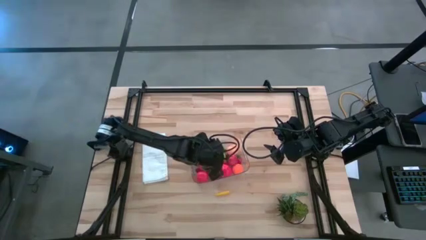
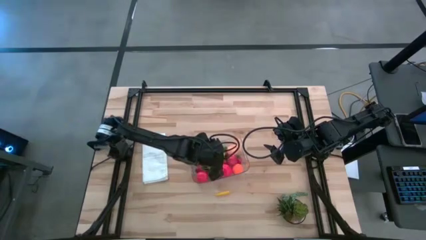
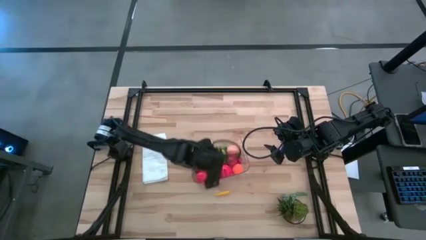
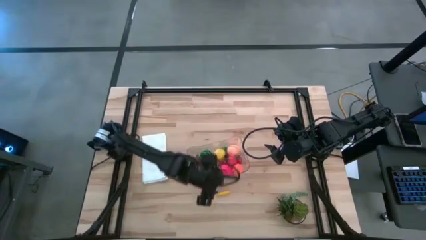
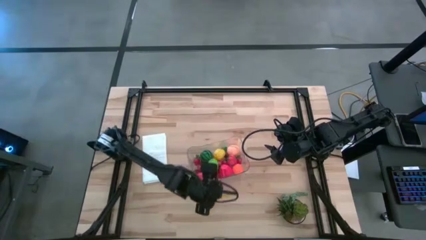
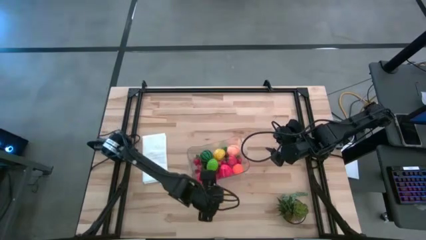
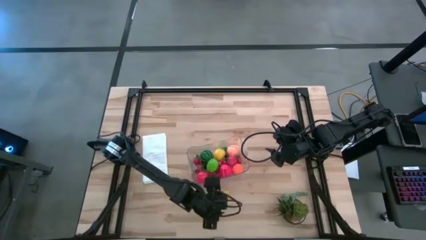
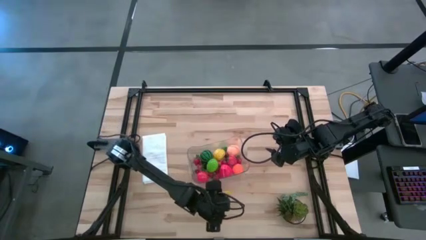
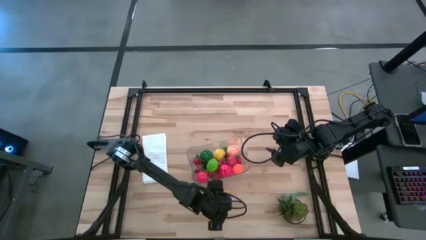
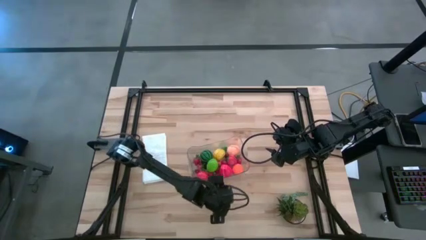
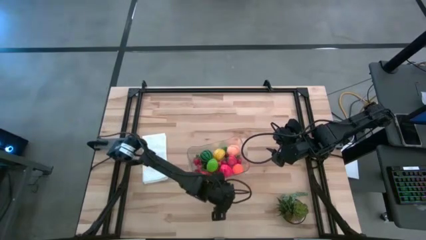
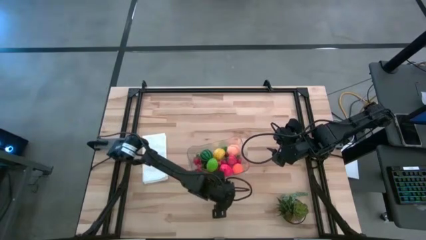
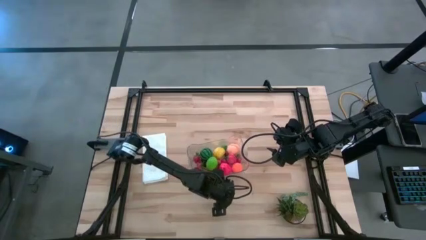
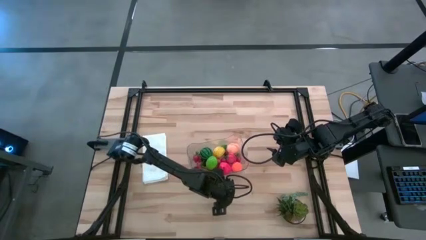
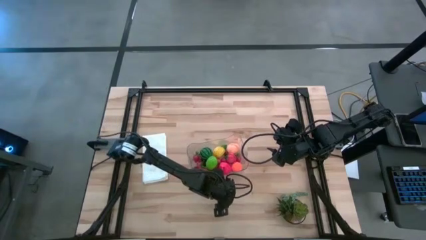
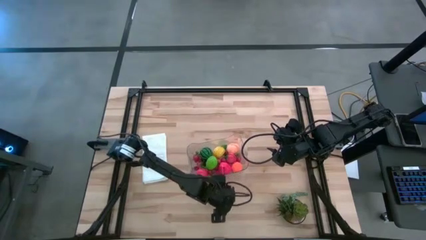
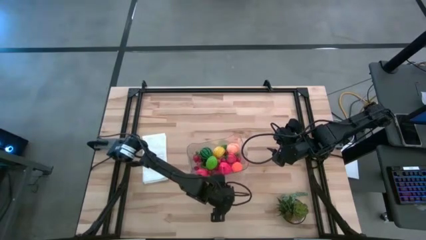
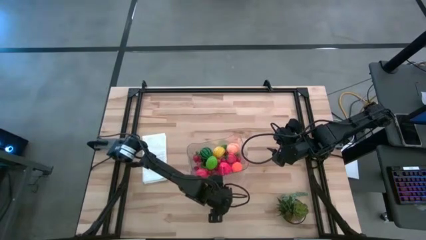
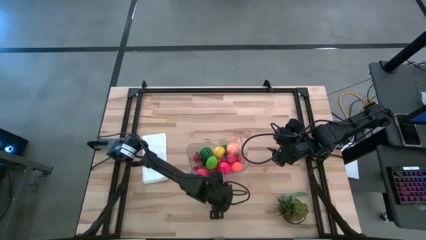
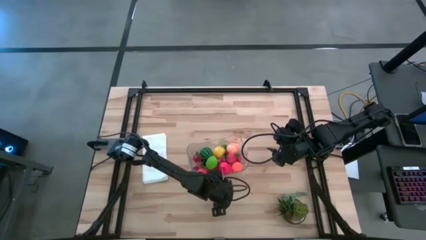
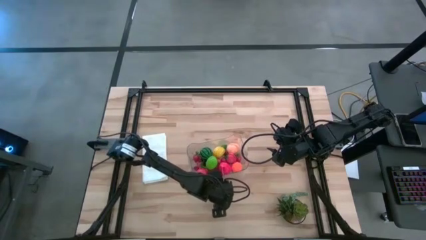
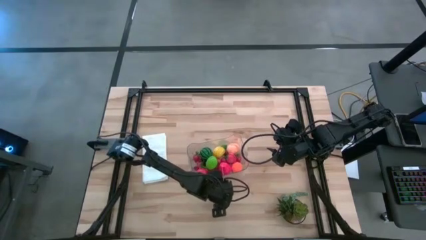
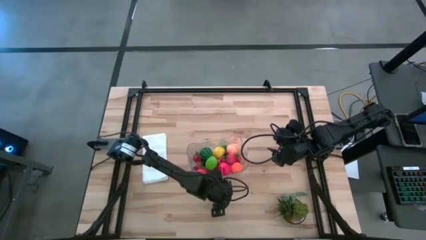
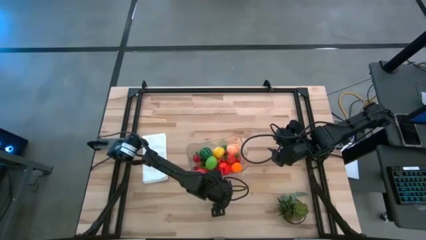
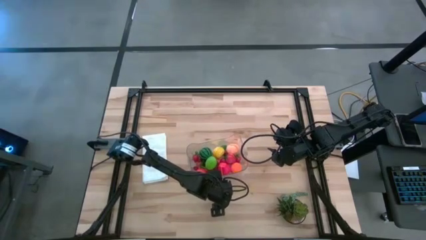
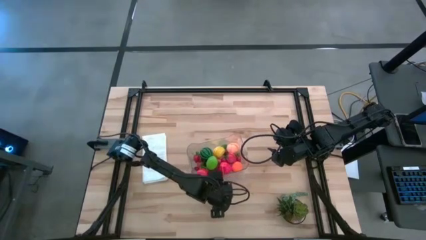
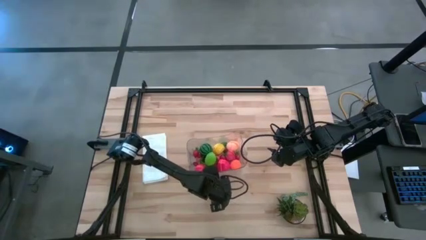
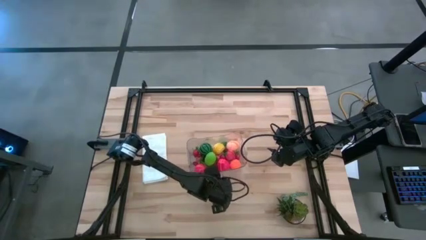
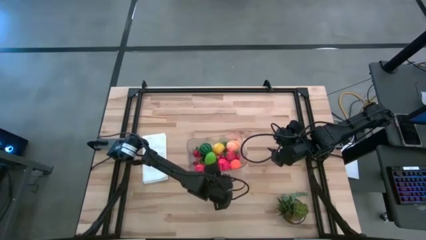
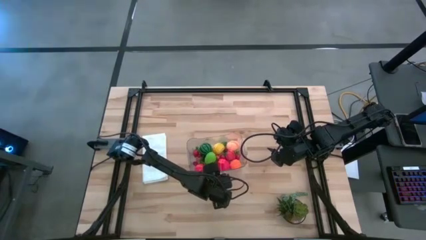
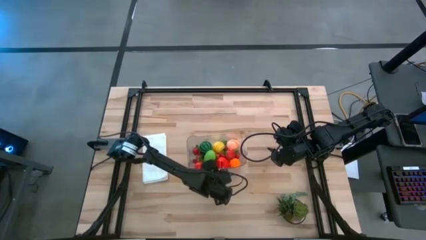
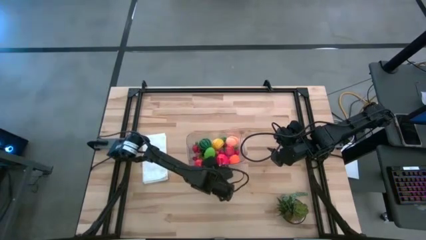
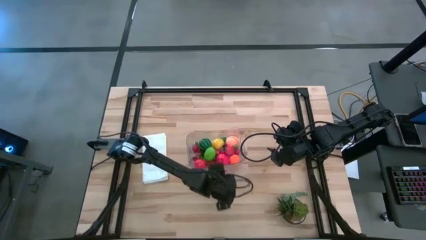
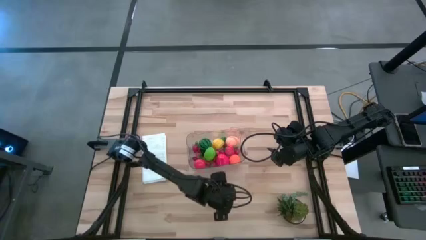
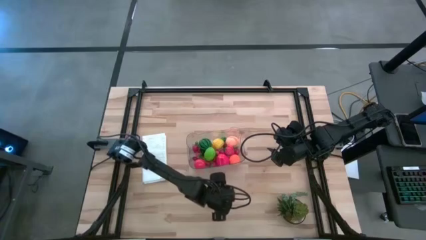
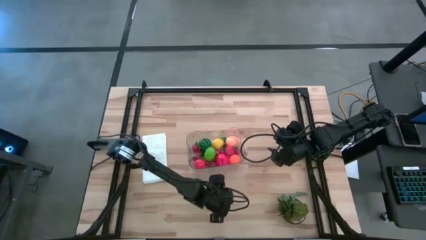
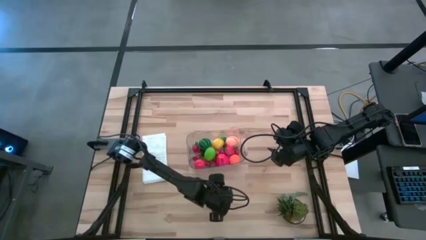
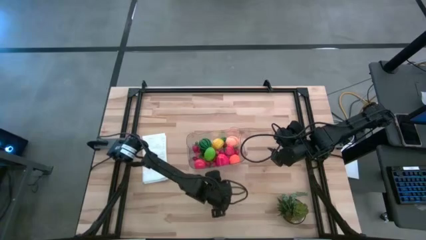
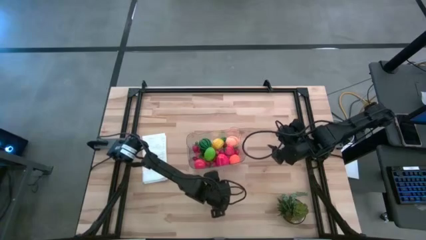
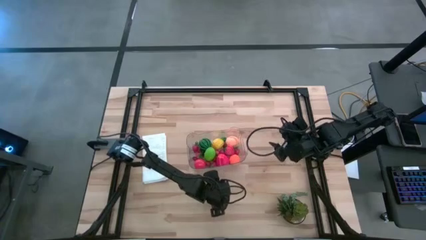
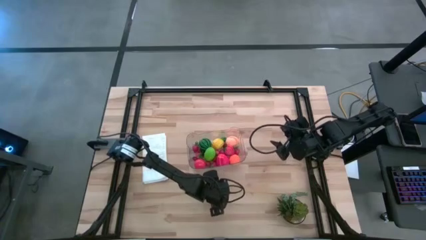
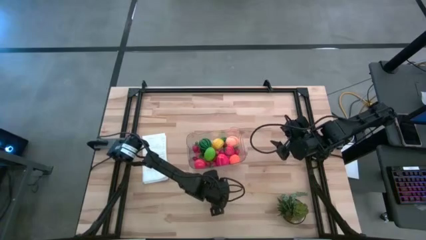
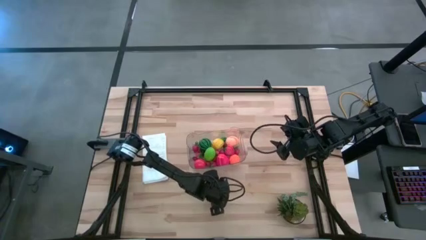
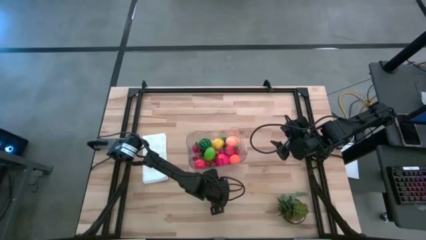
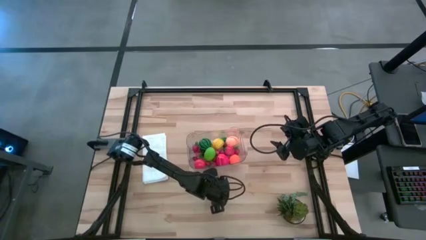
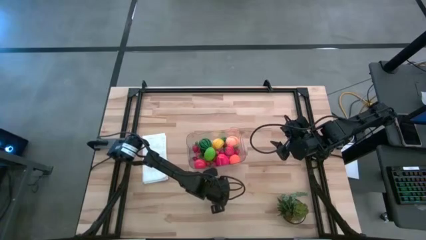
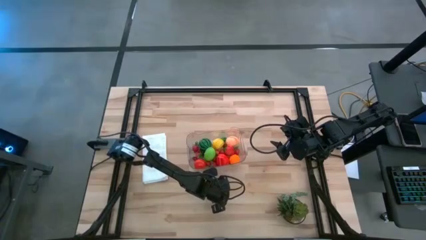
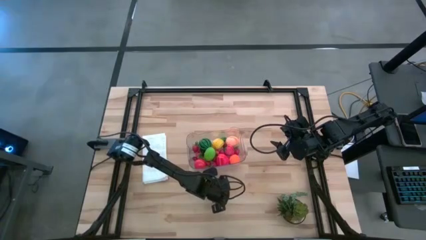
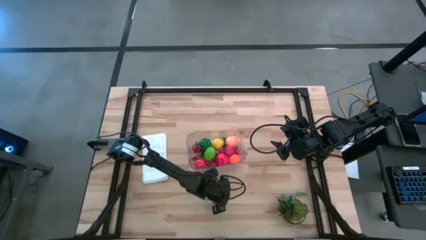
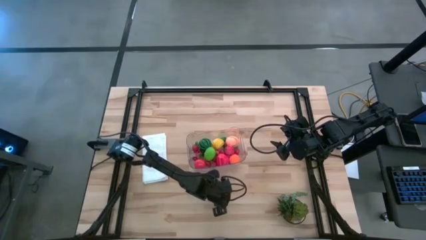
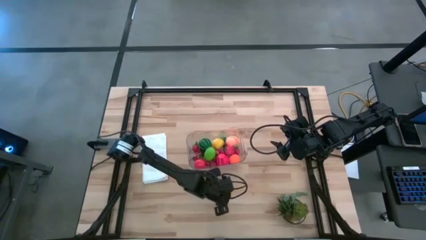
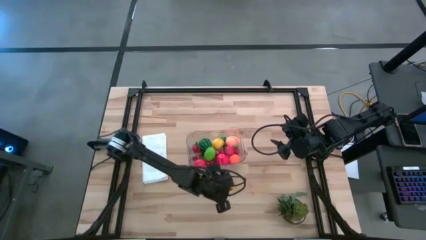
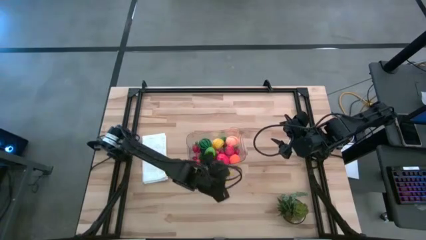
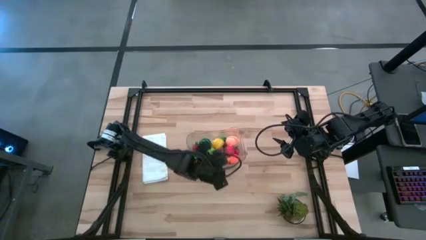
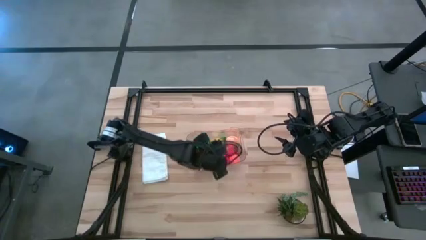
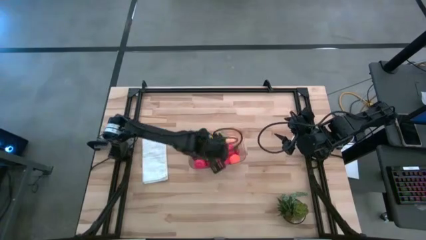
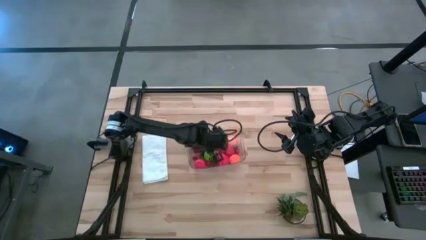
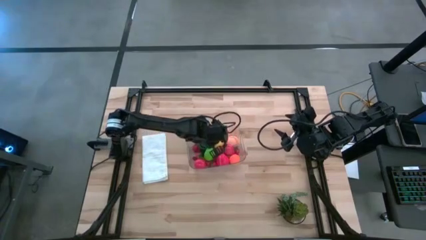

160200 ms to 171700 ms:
Task: Pick and placing Produce into tupperware
Put the corn into the transparent bin

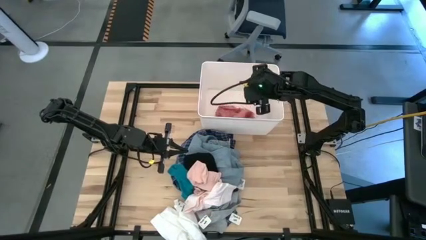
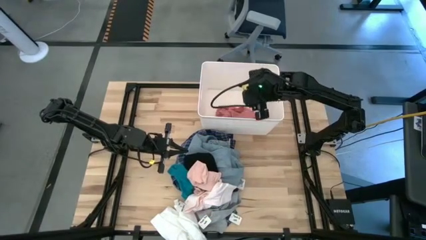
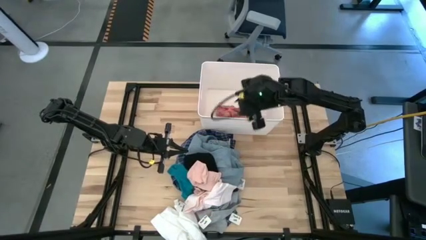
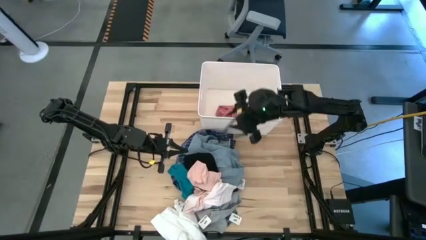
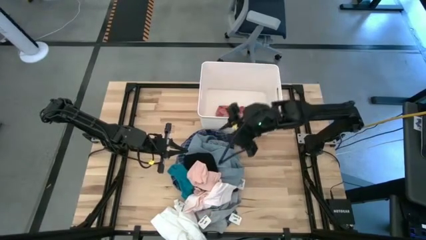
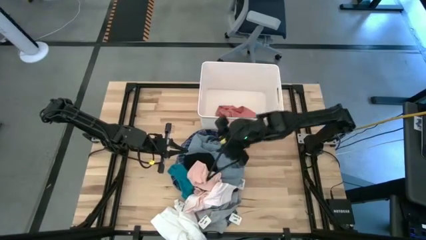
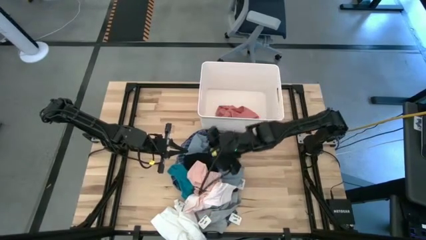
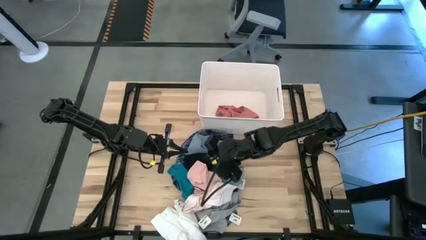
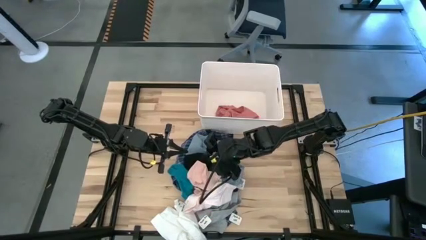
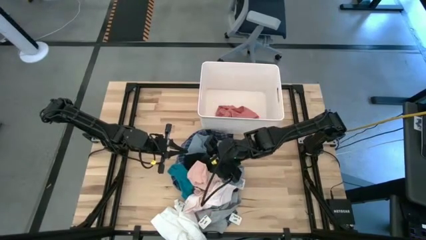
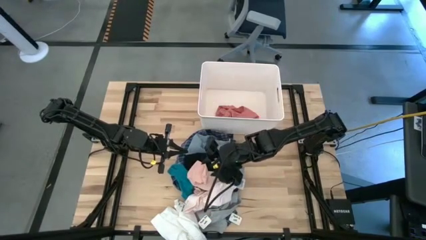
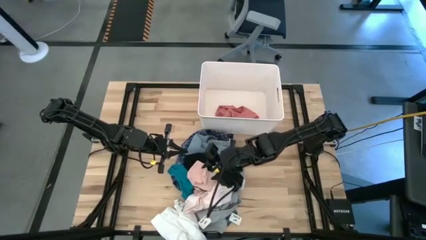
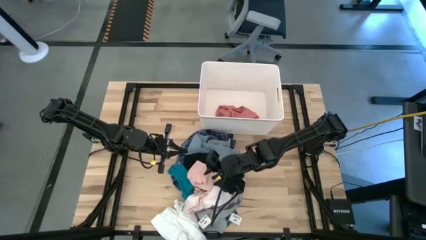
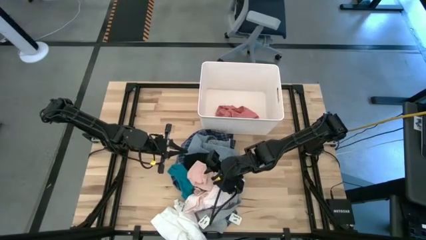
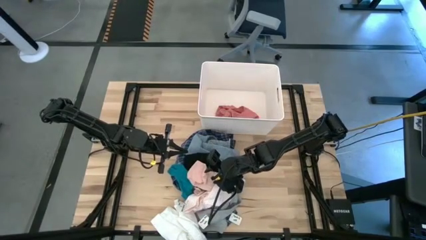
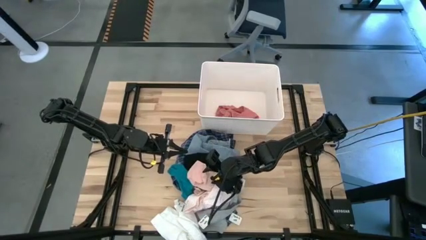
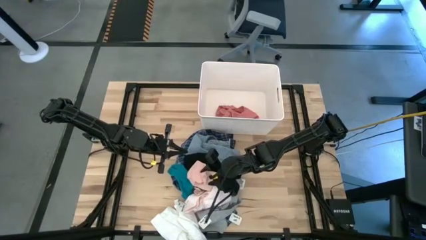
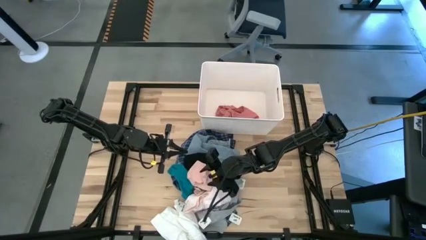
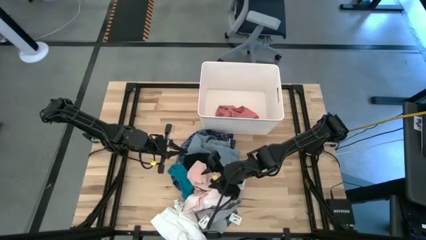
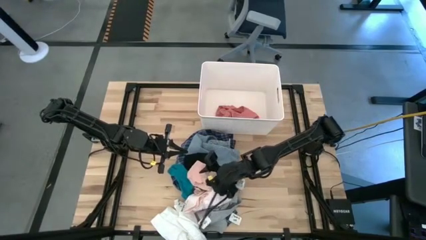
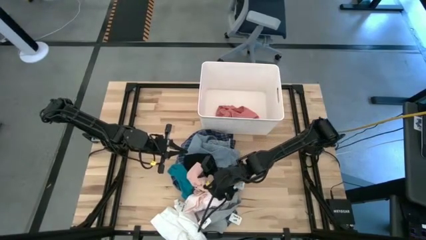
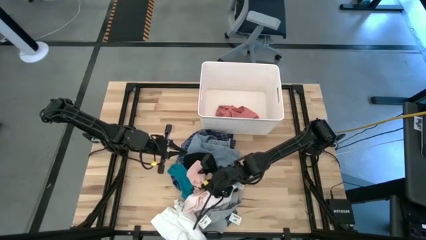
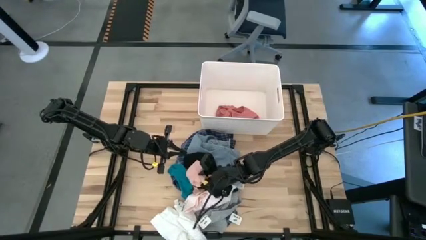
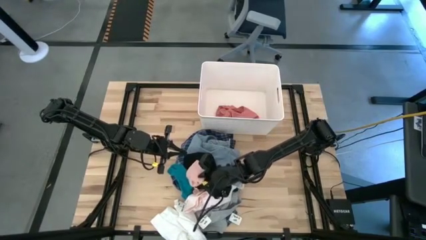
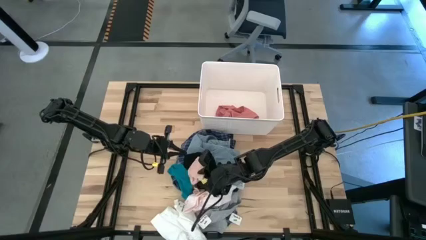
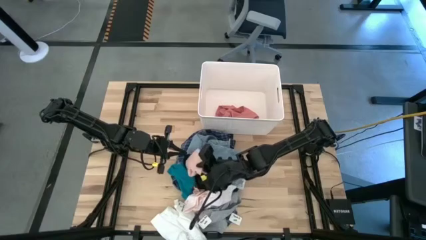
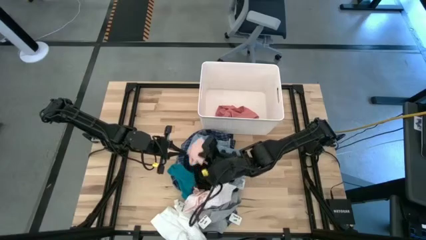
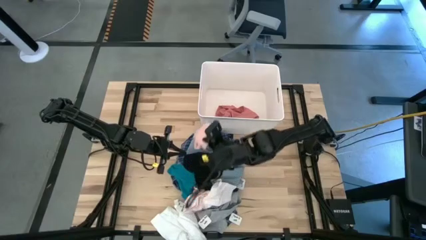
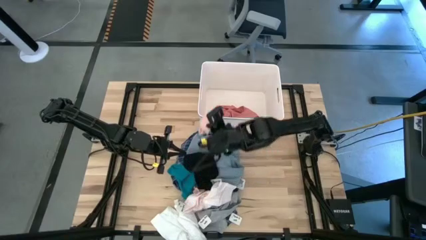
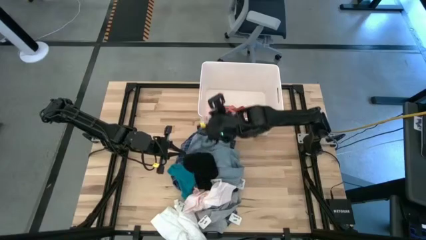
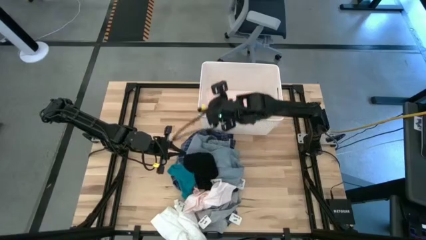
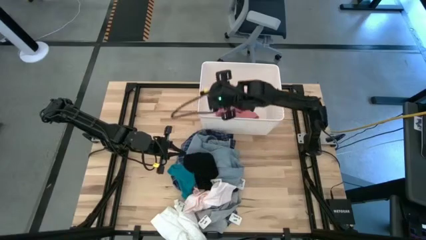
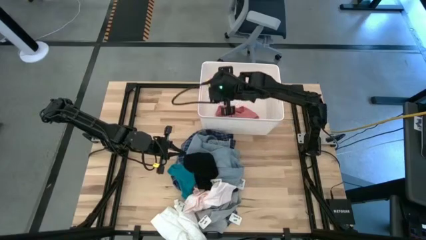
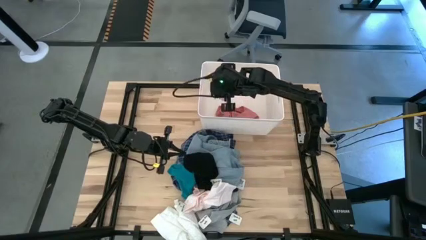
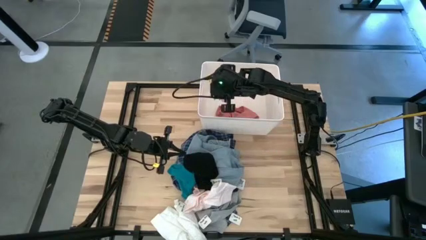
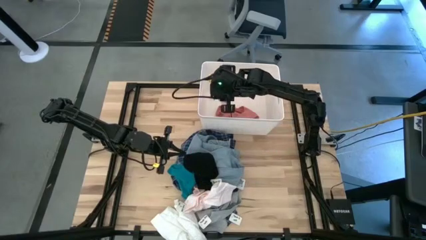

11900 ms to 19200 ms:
Task: Sort clothes
Put the orange sock into the white laundry bin
